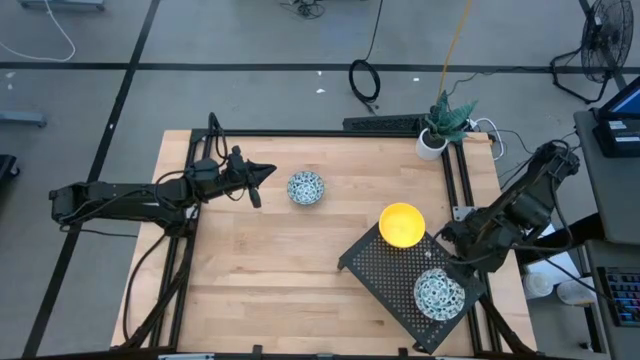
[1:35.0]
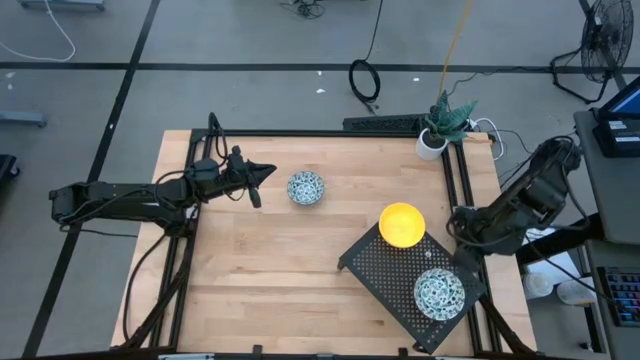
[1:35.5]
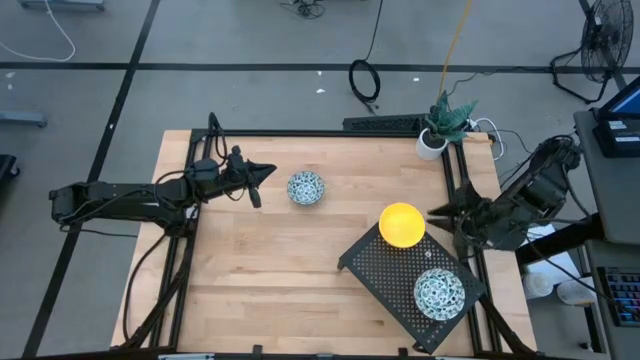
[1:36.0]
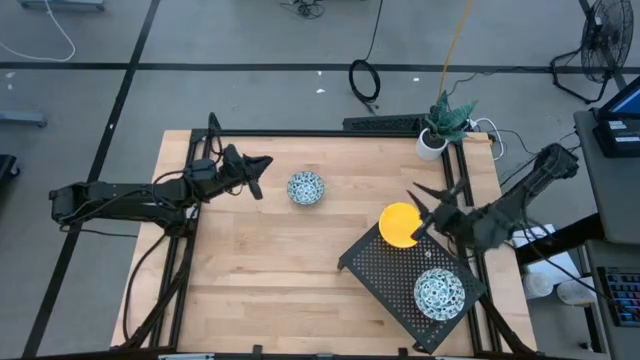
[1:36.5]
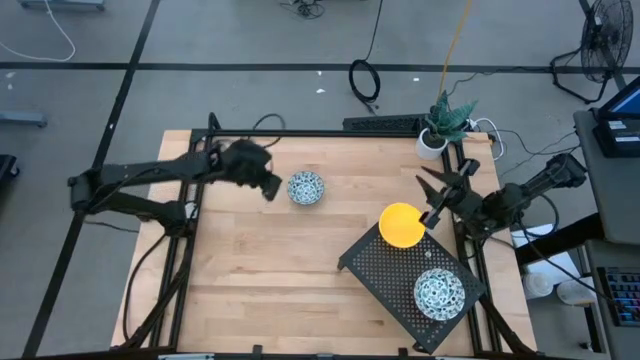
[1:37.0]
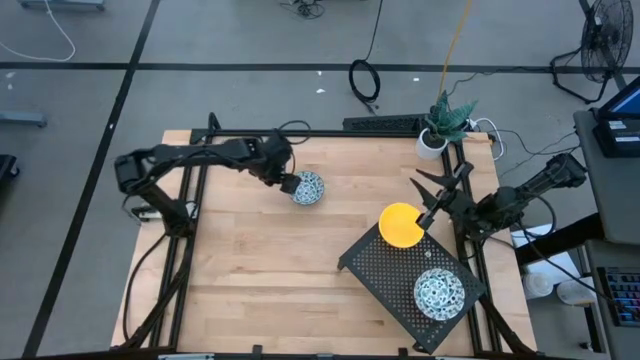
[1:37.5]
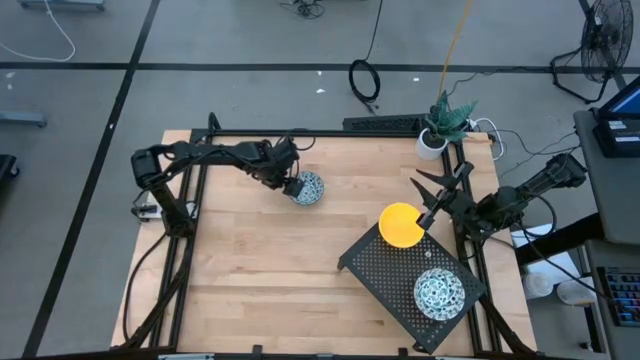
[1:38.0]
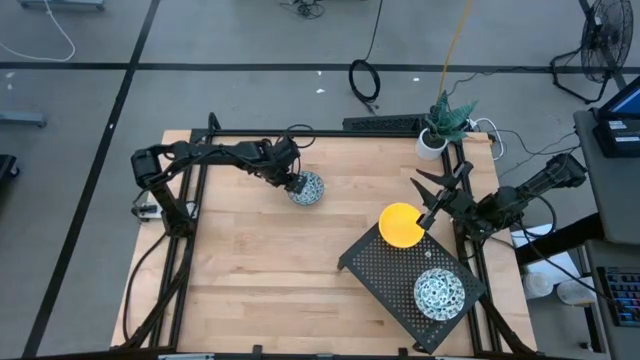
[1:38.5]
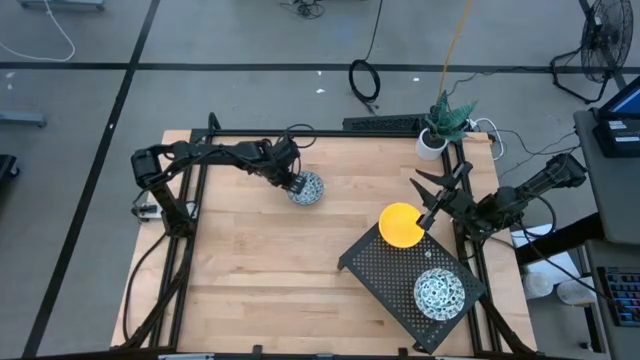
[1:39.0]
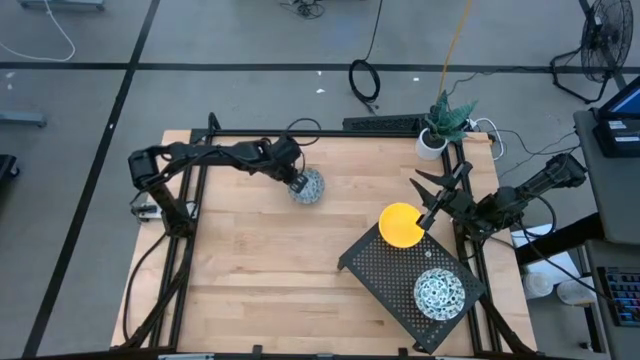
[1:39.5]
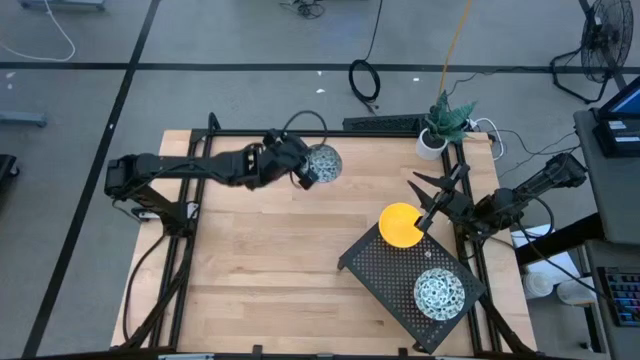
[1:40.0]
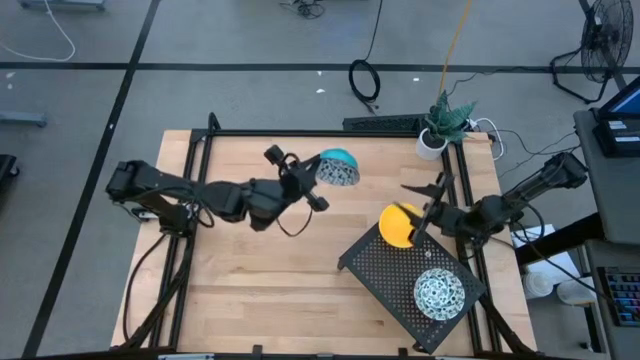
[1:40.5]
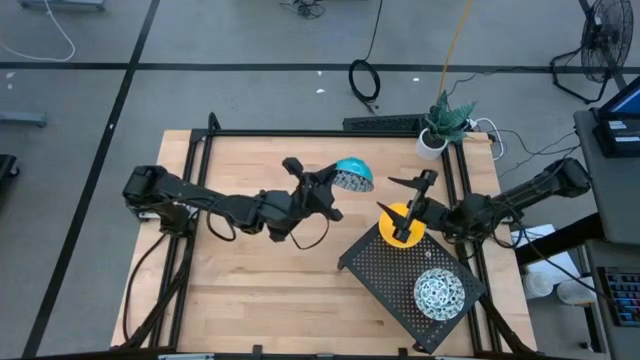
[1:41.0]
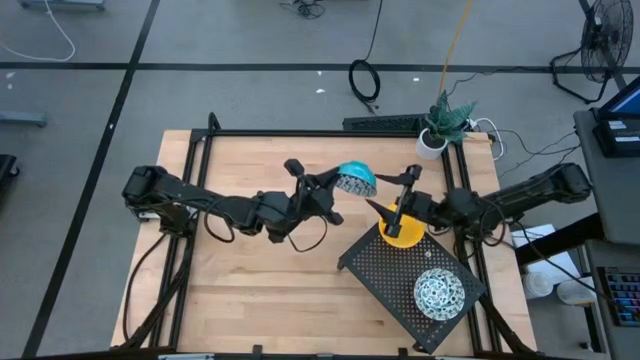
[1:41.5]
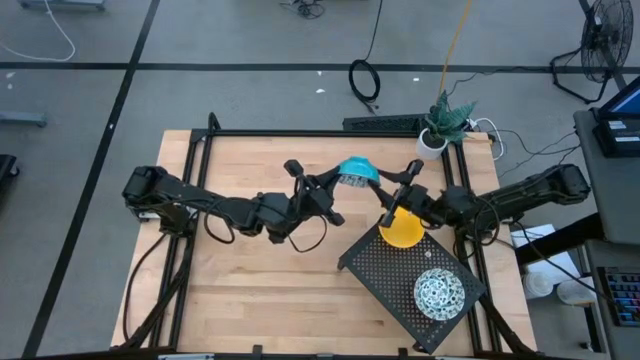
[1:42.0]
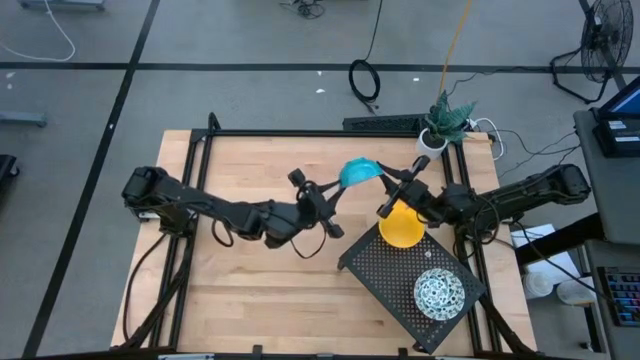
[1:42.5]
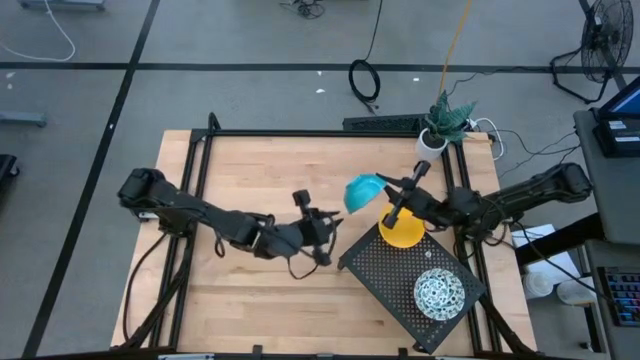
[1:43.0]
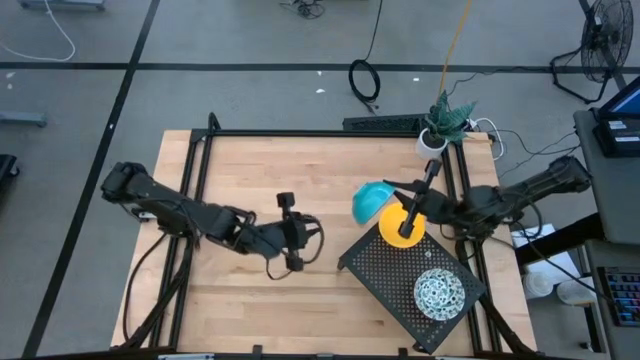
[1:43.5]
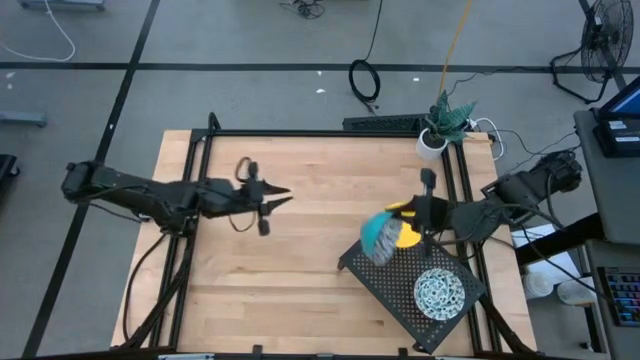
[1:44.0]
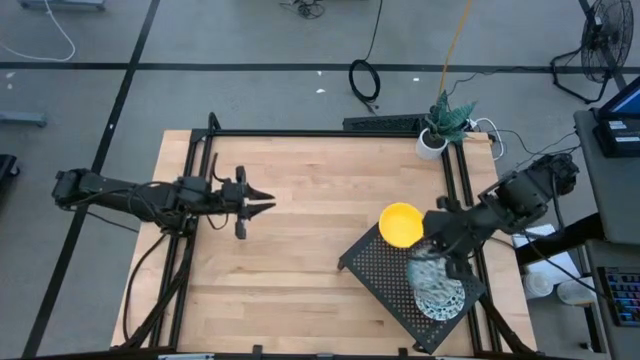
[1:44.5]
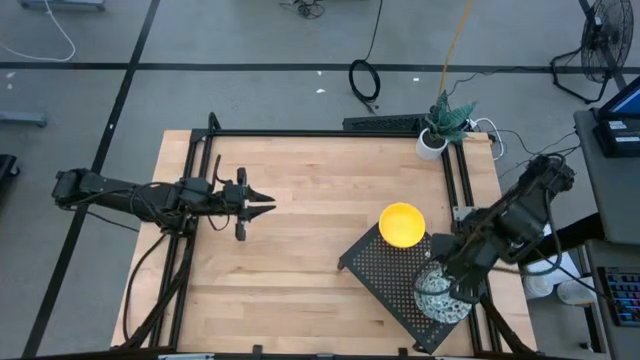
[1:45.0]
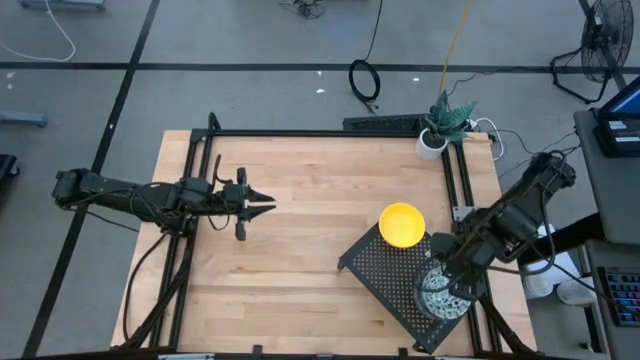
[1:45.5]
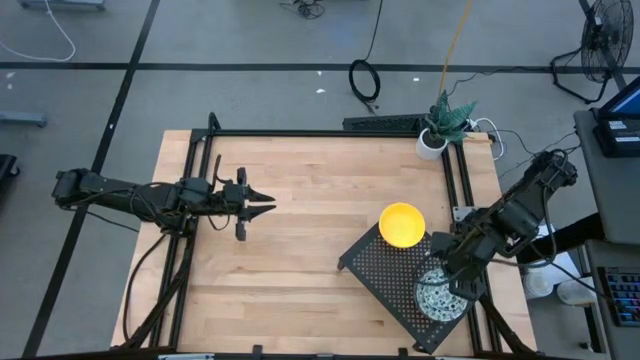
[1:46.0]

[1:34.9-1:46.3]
Task: Pick & Place Mini bowls
Stack the blue patterned bowl on top of the blue patterned bowls on the shelf

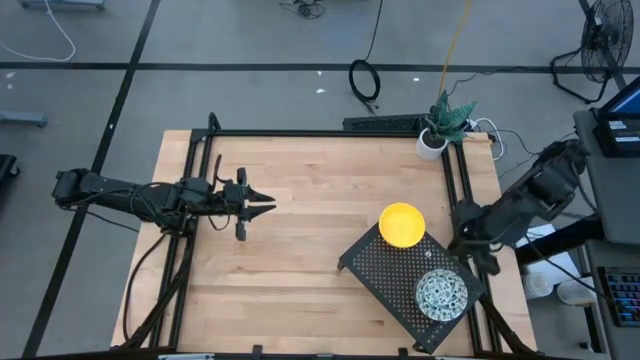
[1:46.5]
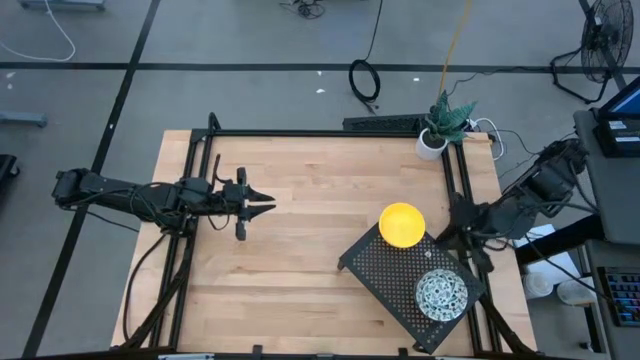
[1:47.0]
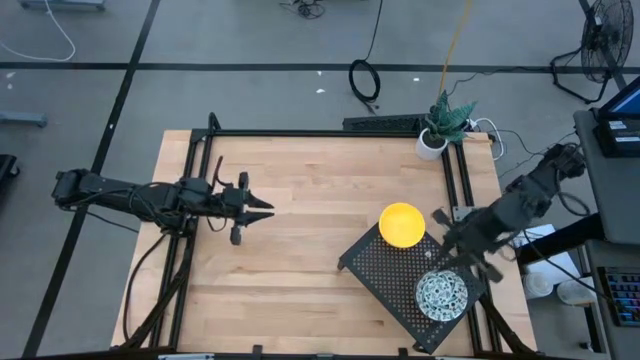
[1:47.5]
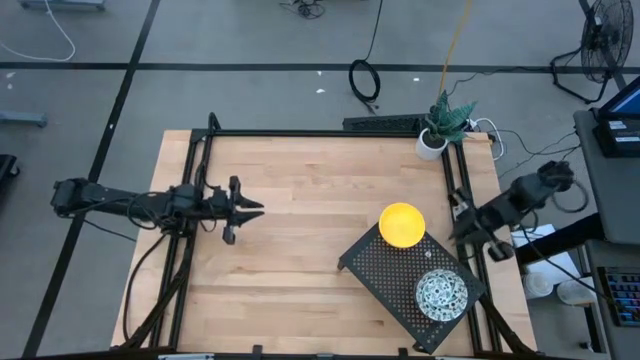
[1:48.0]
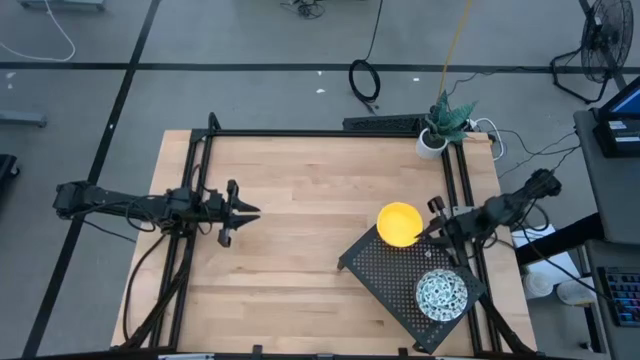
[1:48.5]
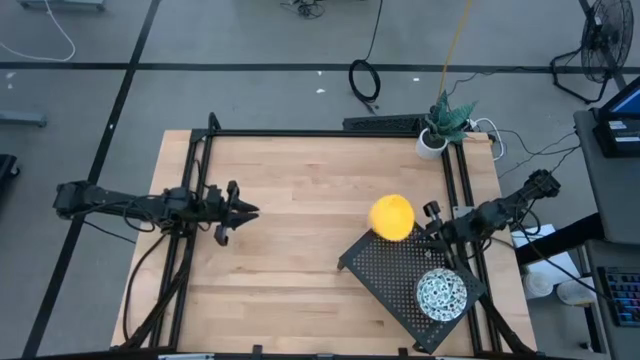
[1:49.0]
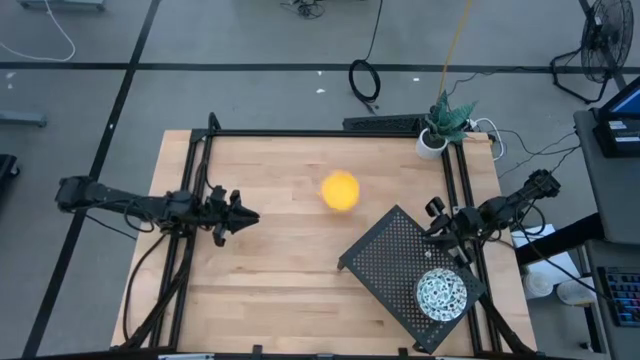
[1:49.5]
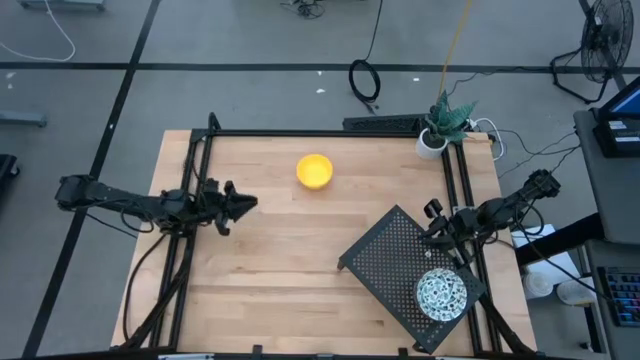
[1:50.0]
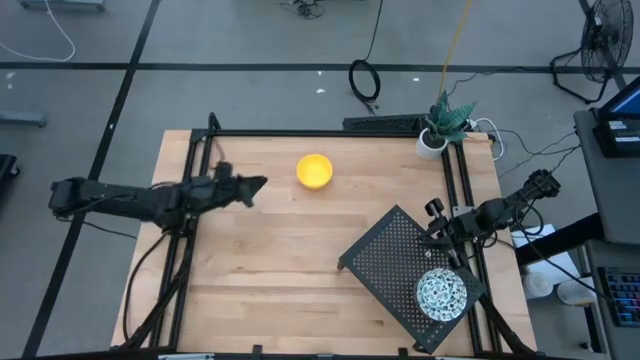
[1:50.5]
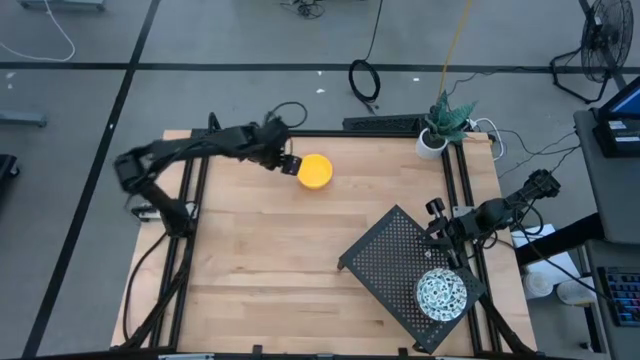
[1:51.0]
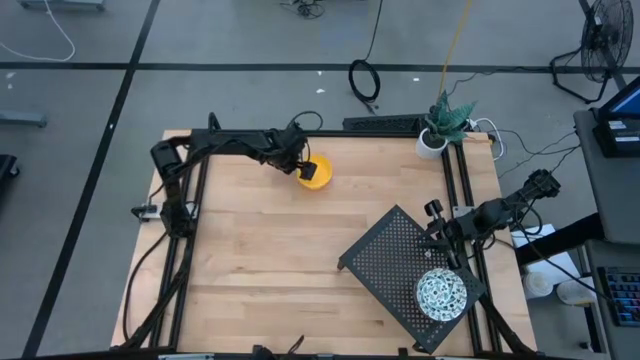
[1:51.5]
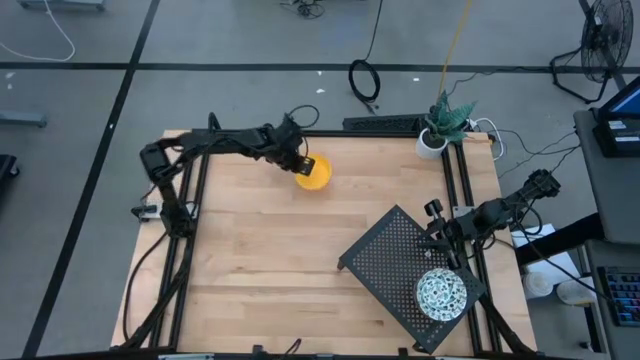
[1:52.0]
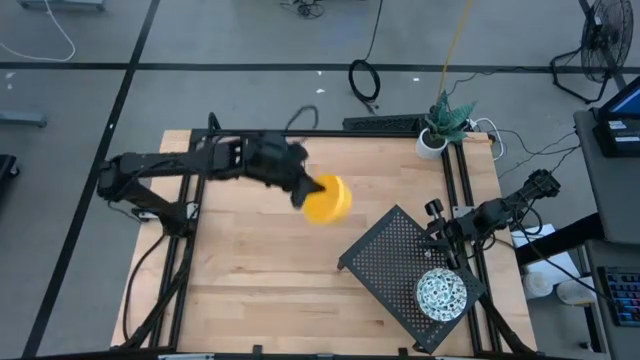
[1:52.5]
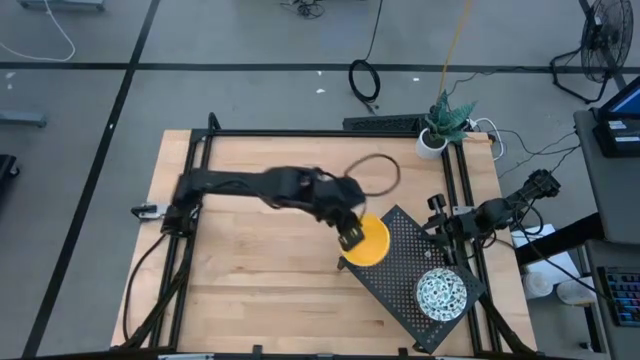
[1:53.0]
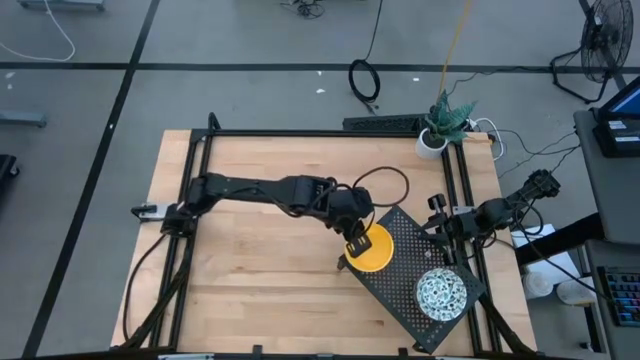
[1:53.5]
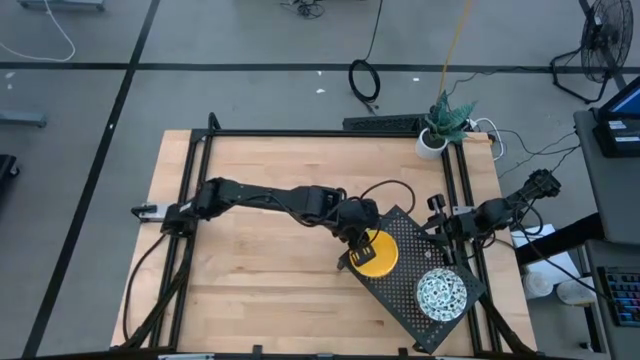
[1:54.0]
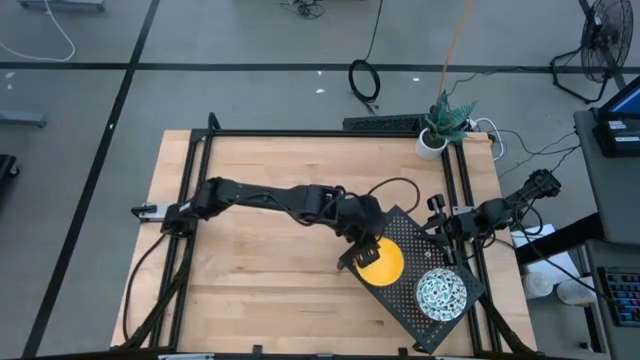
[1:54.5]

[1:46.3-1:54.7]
Put the stacked yellow bowls on the shelf
